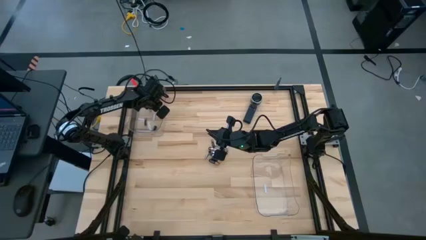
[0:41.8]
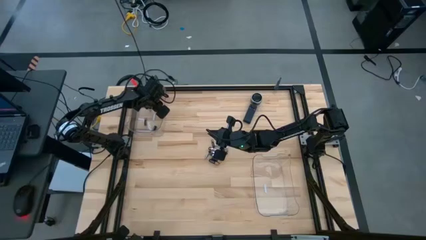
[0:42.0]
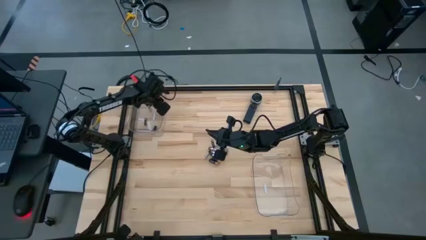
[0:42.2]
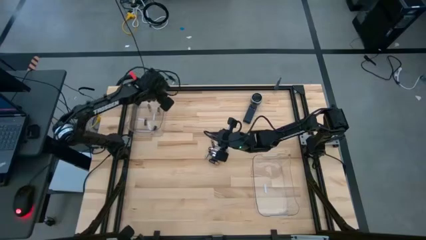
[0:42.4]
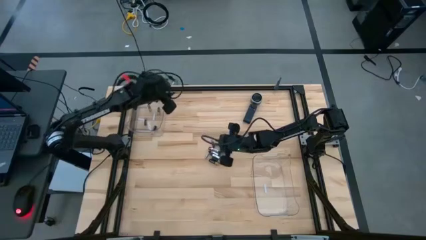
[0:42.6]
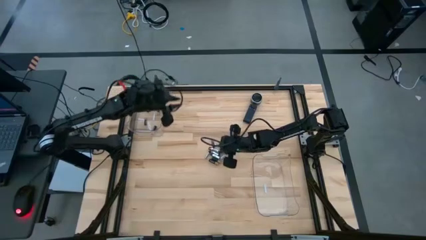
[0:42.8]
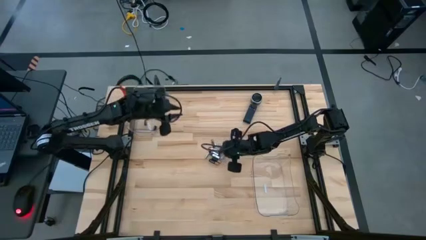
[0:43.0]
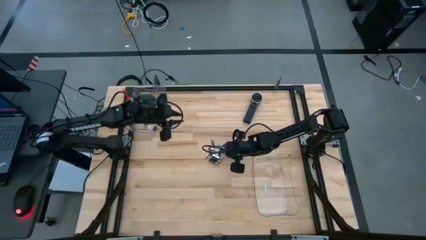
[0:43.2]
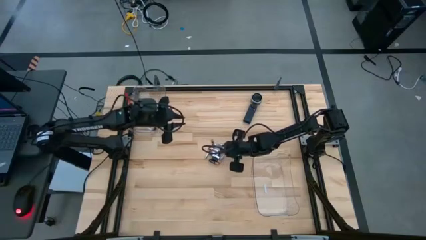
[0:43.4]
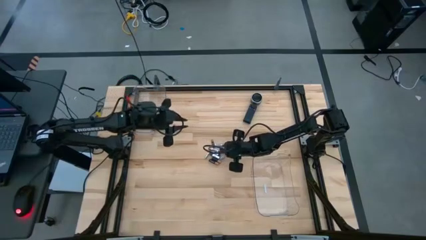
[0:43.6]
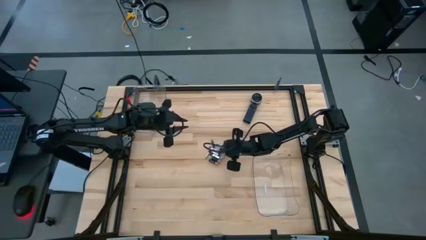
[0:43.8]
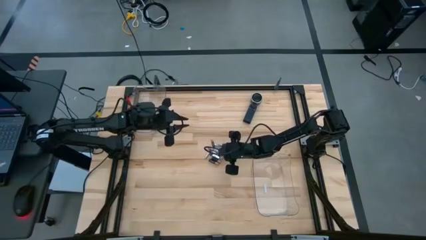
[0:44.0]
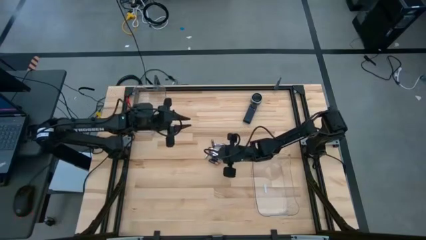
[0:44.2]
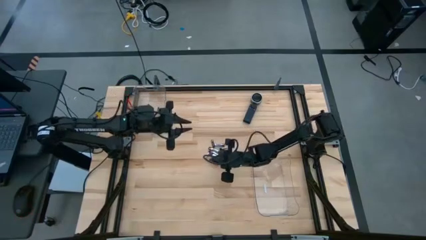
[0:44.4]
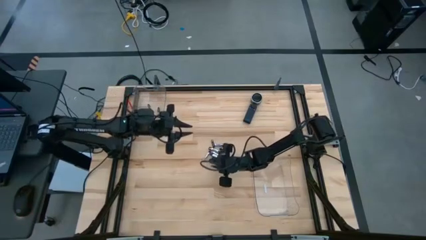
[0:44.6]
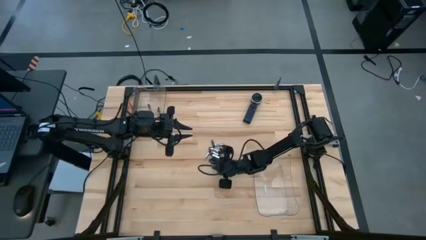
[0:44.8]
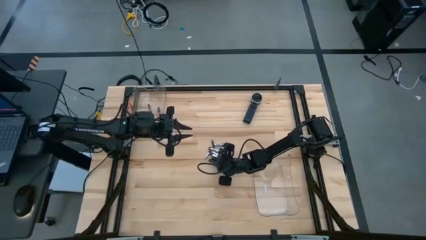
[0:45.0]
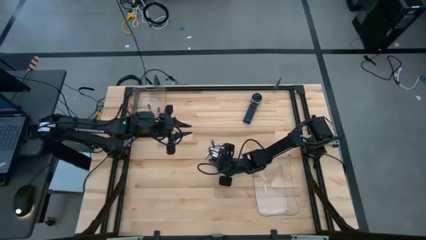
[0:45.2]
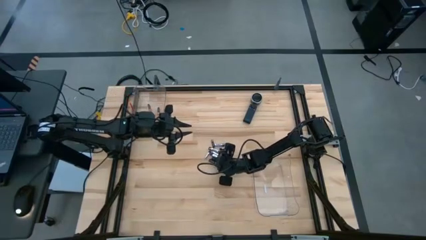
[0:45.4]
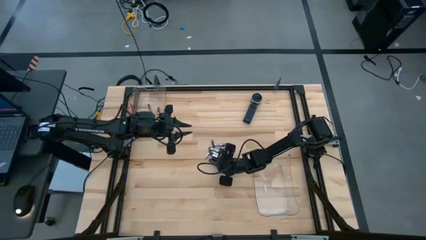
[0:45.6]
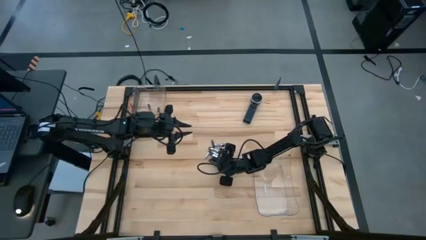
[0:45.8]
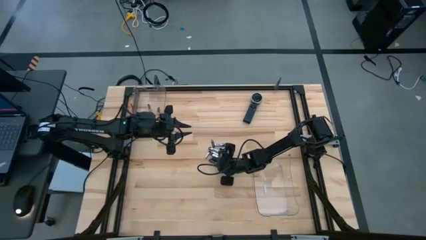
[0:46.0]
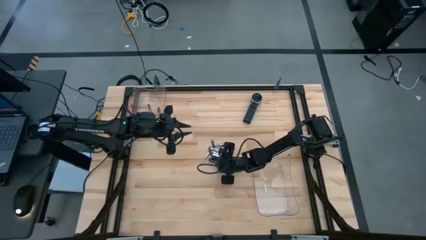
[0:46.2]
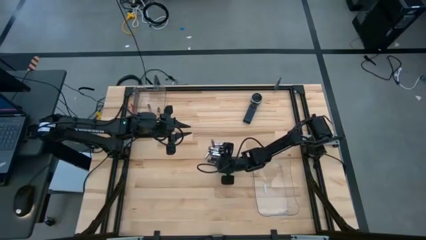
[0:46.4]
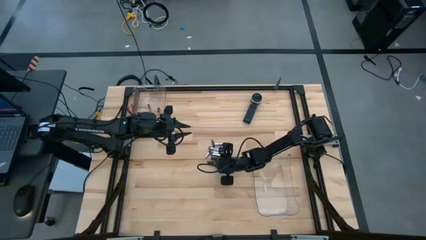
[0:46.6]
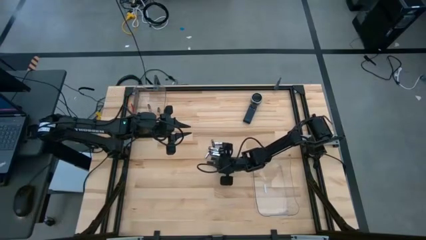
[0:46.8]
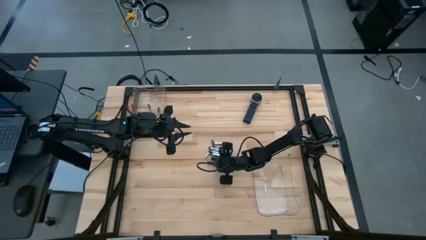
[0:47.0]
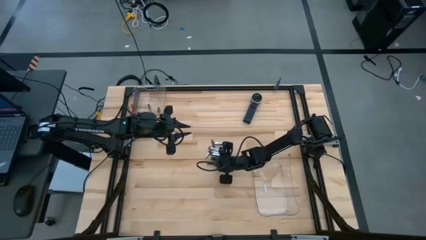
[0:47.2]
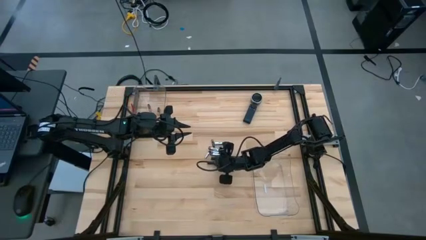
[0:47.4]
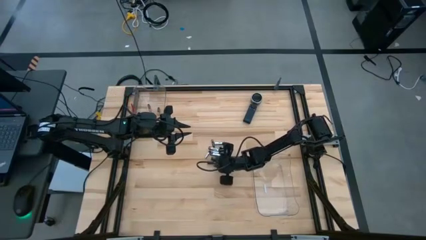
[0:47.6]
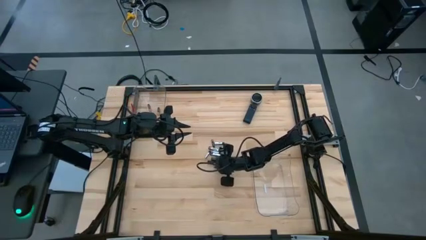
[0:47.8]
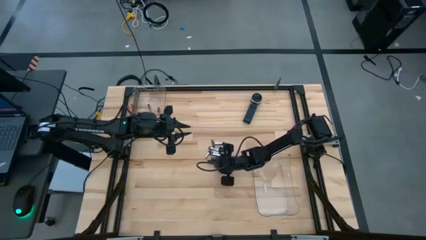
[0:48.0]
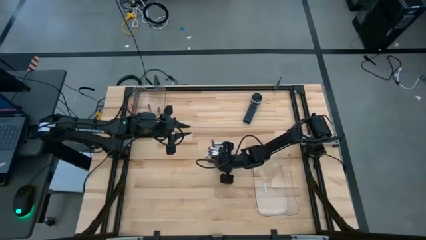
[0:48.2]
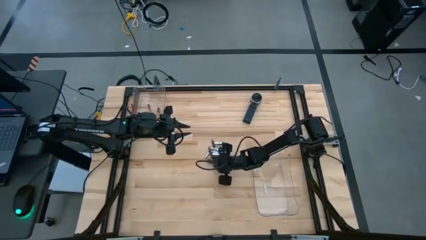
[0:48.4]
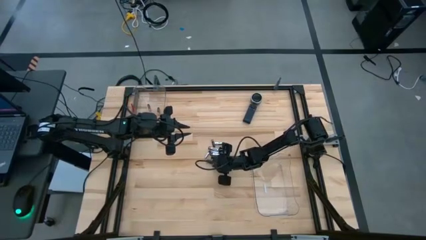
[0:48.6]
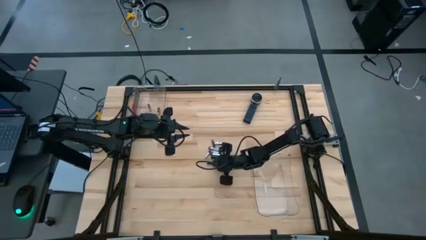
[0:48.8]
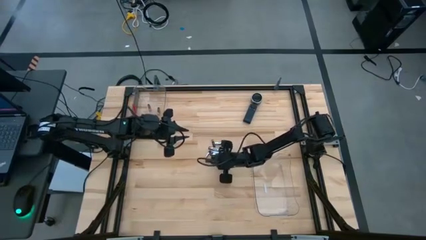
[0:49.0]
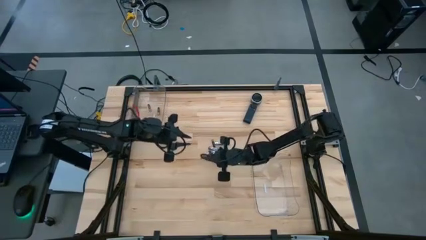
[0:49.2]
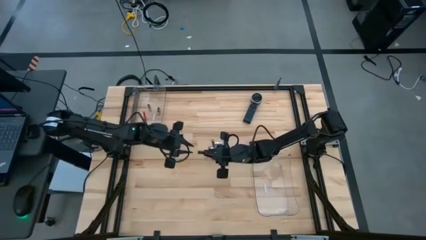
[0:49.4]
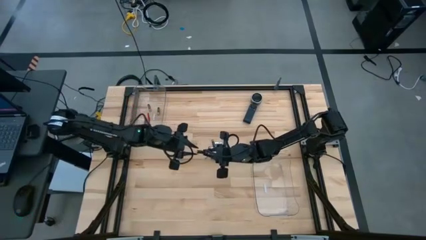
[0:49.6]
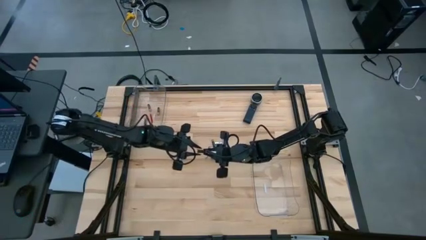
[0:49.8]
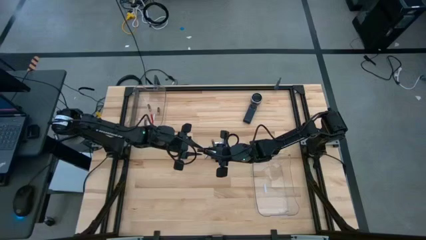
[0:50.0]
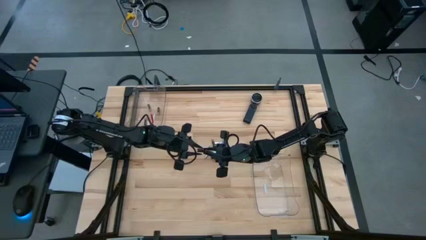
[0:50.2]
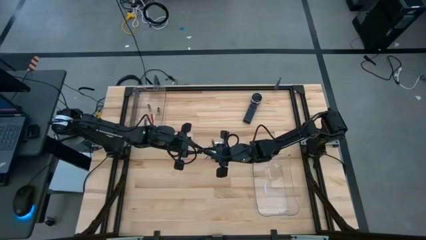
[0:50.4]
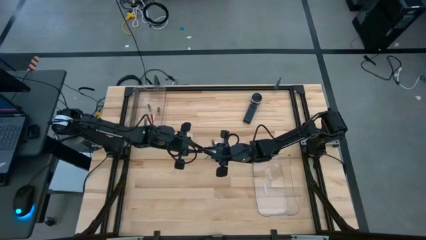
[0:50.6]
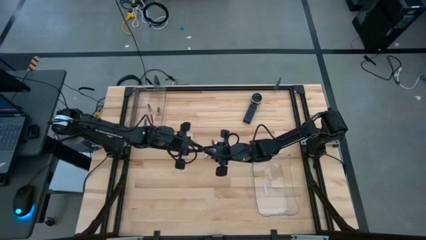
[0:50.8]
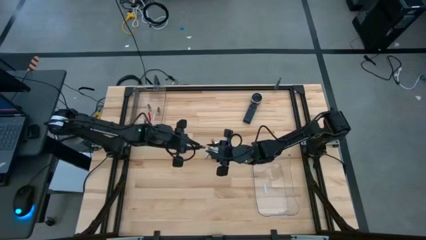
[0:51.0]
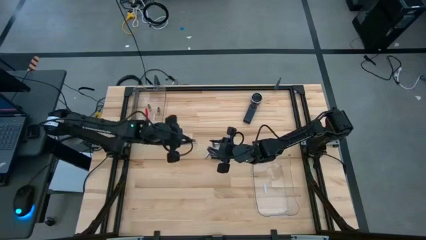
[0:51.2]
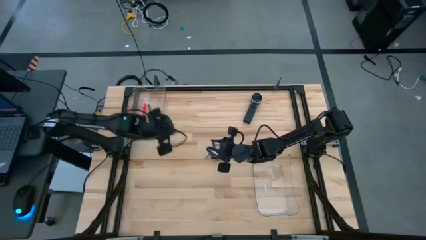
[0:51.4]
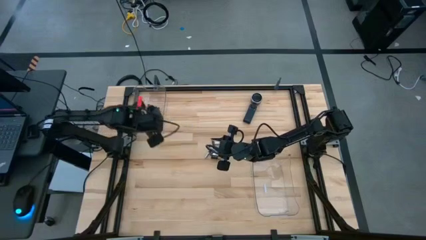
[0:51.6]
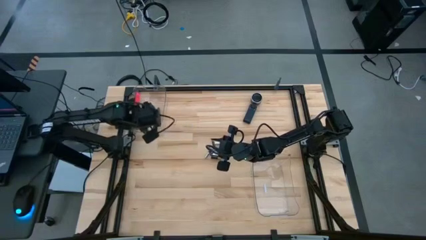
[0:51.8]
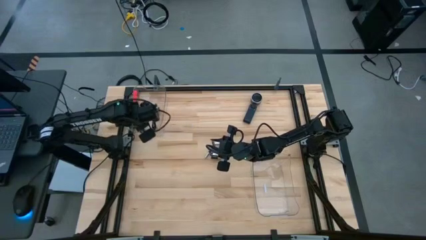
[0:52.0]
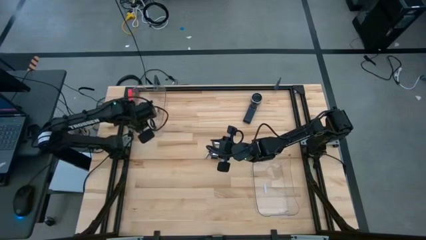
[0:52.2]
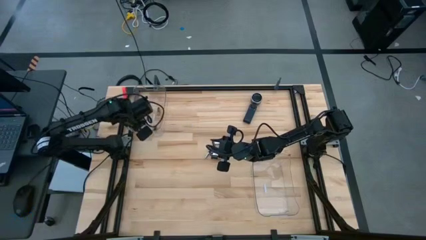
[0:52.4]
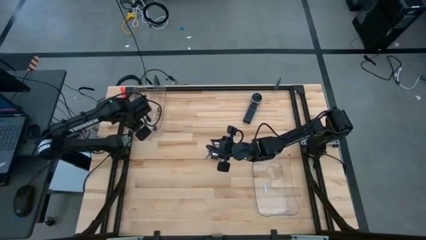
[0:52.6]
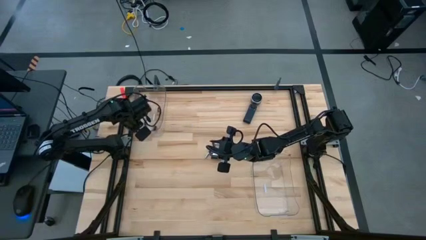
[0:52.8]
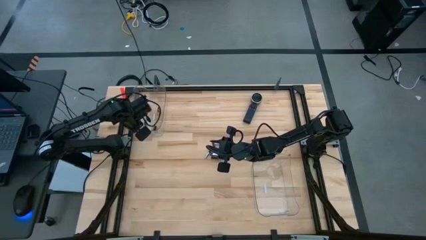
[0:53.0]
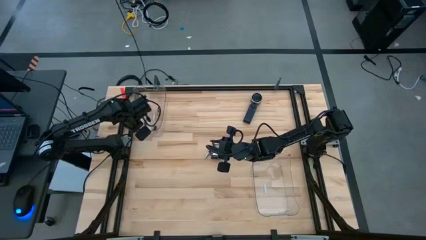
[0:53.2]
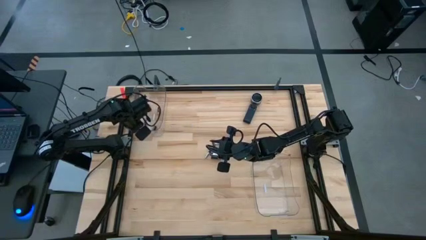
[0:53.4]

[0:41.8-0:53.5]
Task: Sort batteries
Put the bottom black battery into the top transparent bin

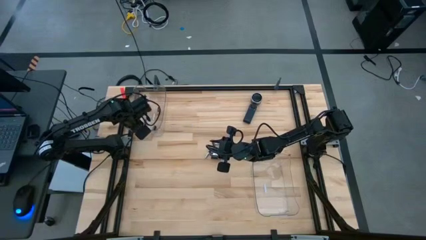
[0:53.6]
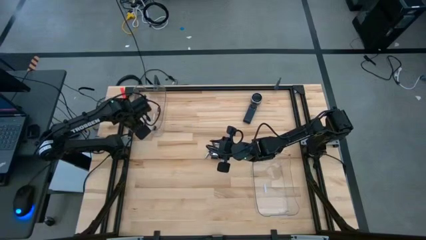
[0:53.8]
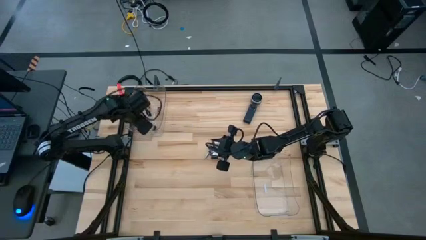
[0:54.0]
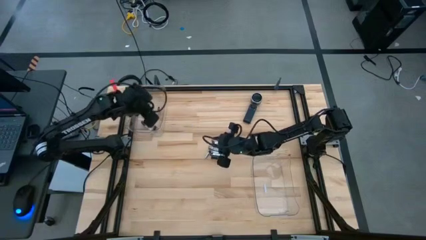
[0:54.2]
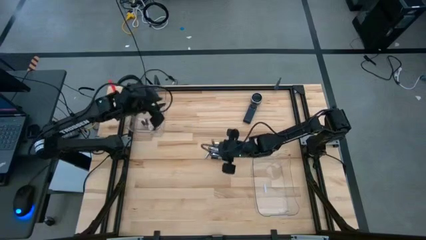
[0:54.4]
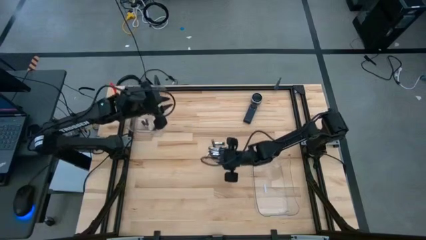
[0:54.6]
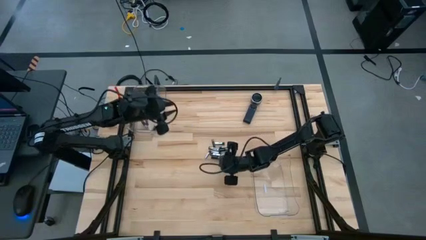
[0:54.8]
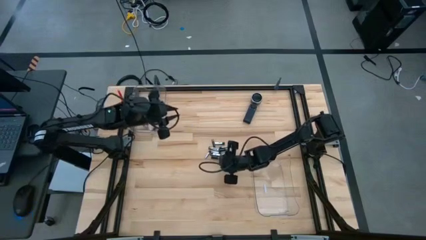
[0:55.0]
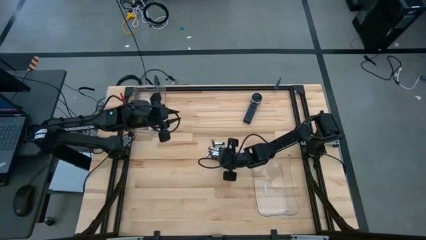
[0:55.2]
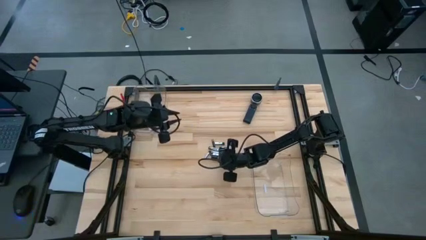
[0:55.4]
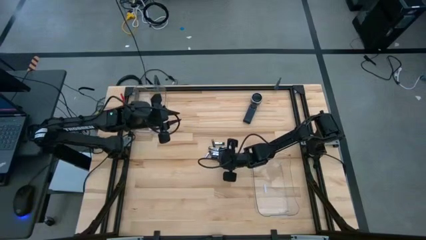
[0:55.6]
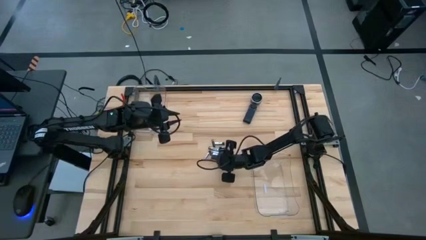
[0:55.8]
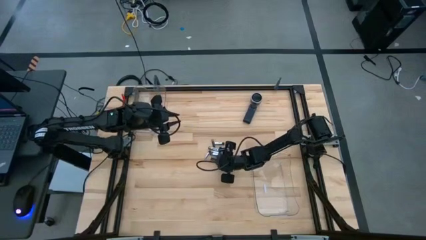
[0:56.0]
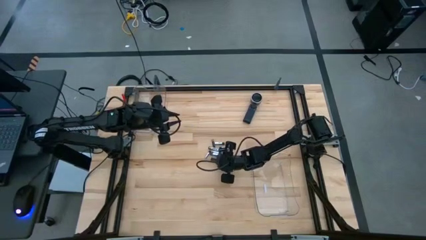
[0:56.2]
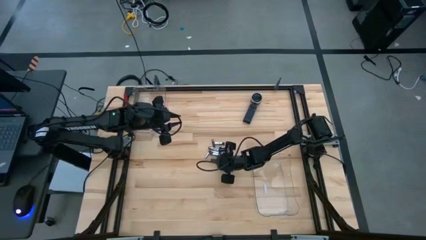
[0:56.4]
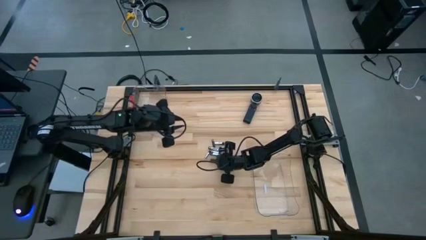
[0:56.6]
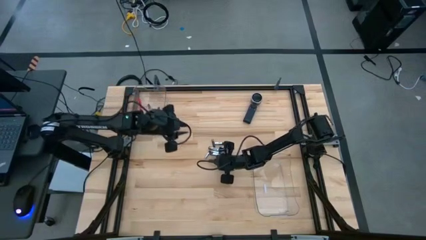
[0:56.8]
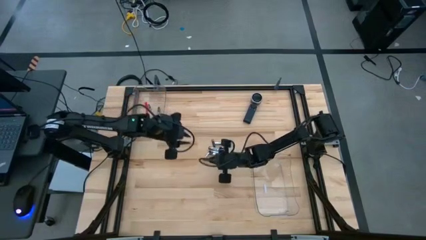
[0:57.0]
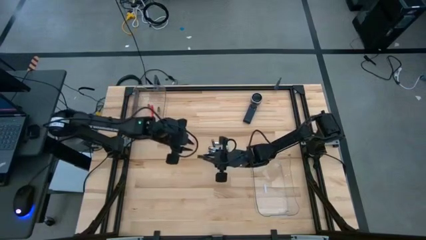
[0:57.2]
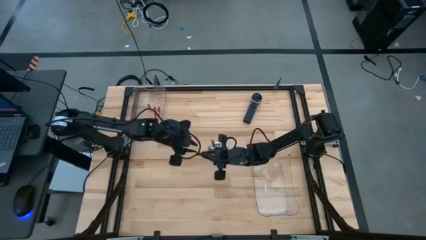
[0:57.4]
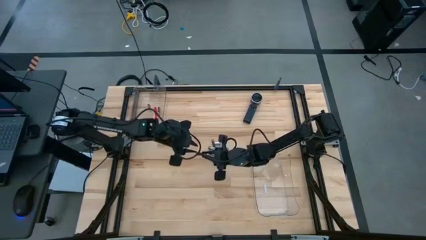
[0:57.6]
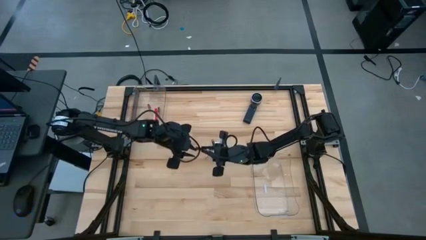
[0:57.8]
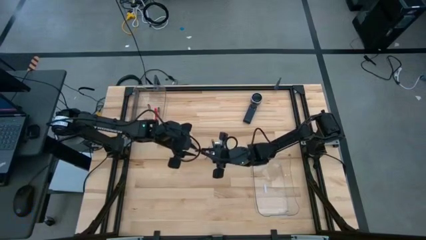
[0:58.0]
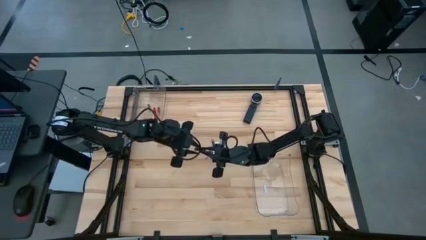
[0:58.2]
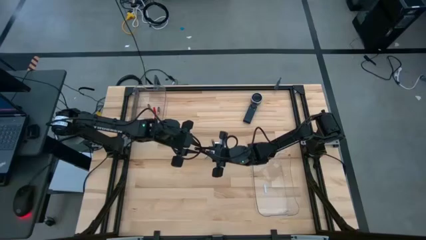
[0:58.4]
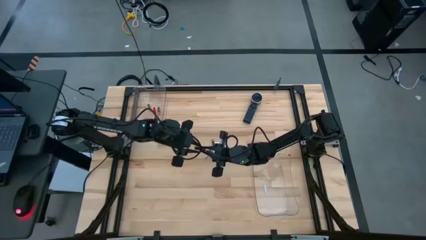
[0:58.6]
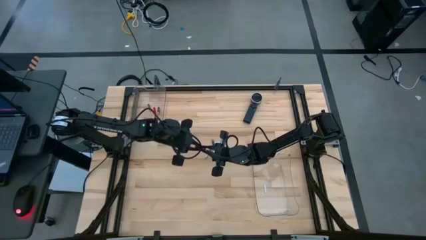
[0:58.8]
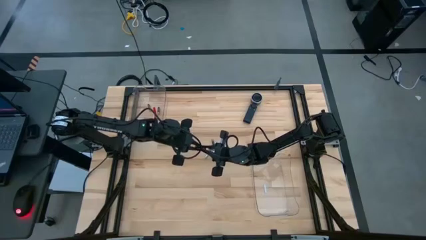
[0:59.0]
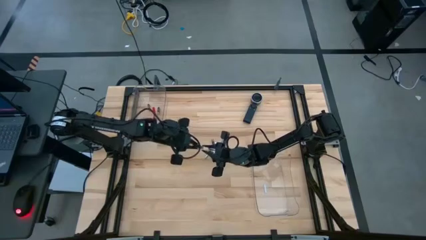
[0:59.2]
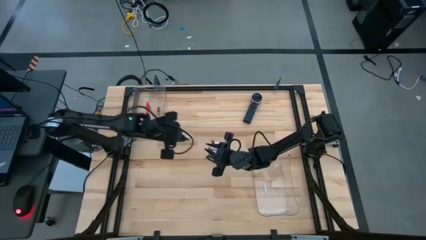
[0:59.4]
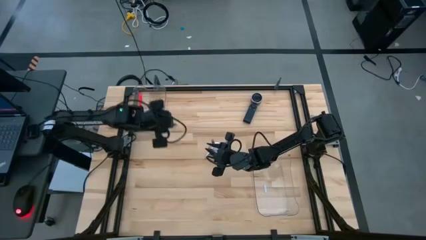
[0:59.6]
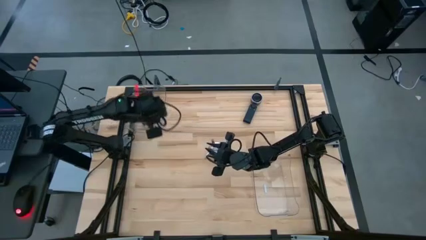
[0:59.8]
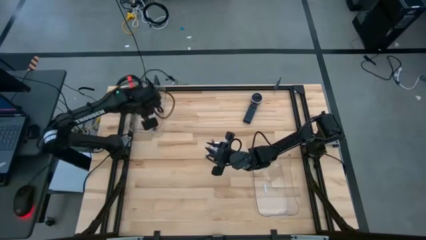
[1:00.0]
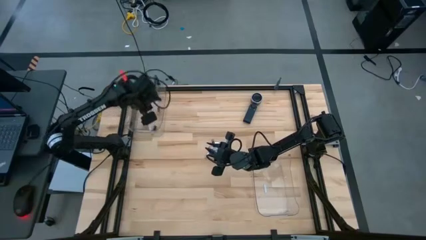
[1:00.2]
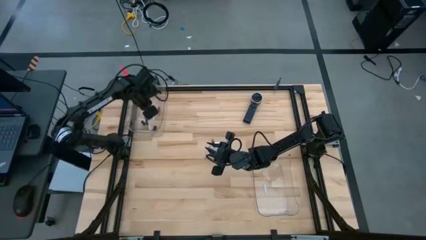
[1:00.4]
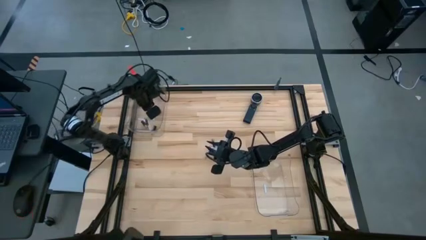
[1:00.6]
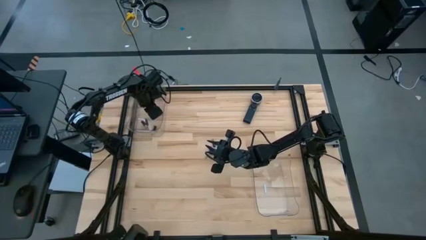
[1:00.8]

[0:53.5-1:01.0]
Put the bottom black battery into the top transparent bin
